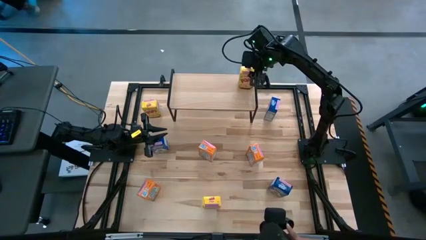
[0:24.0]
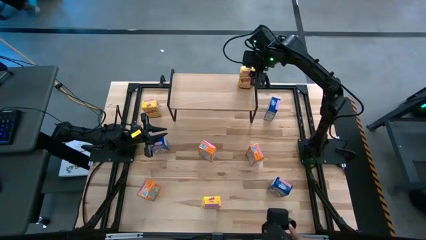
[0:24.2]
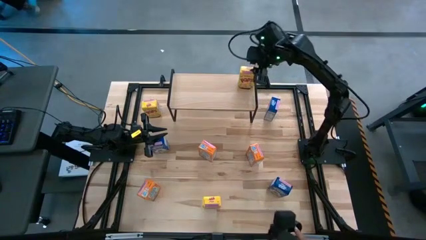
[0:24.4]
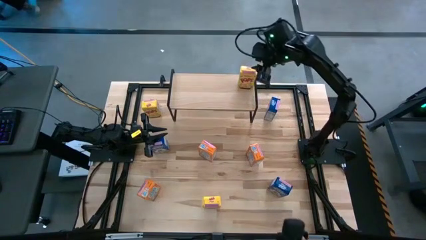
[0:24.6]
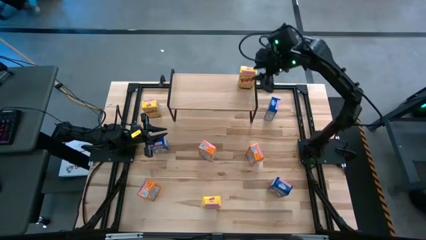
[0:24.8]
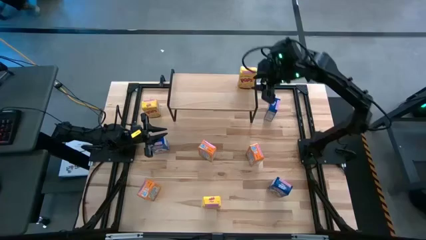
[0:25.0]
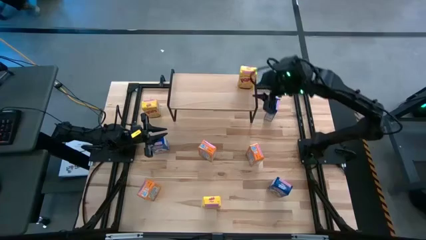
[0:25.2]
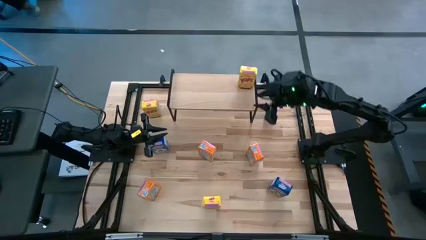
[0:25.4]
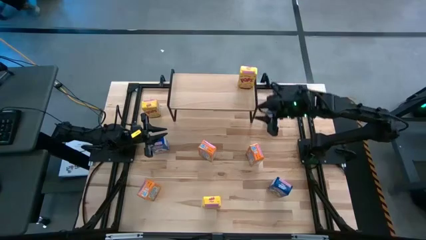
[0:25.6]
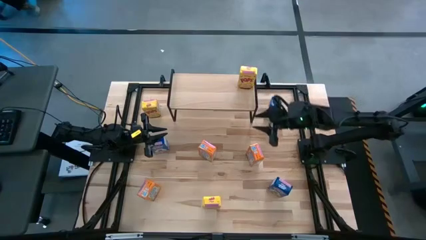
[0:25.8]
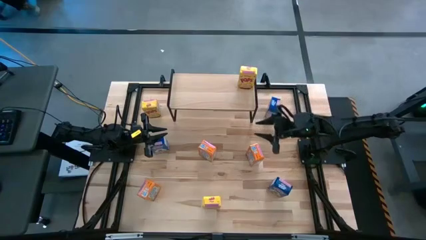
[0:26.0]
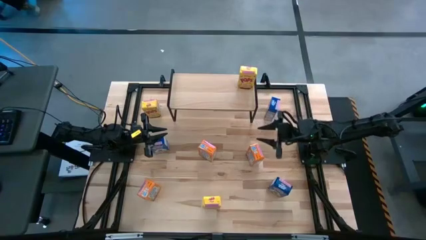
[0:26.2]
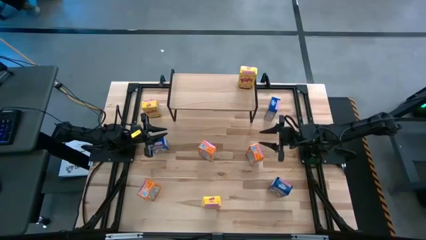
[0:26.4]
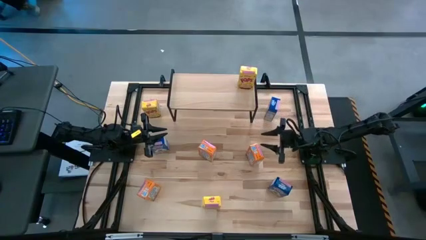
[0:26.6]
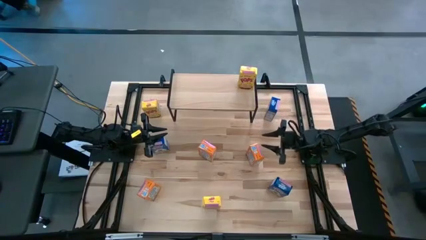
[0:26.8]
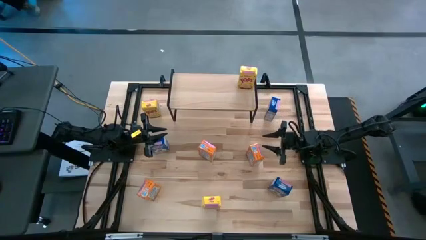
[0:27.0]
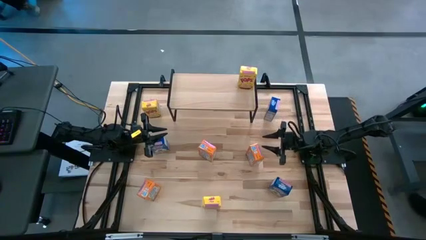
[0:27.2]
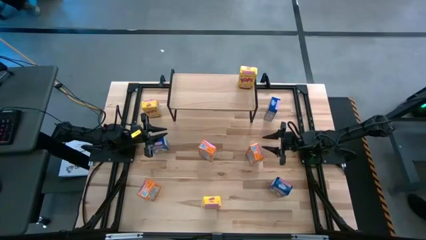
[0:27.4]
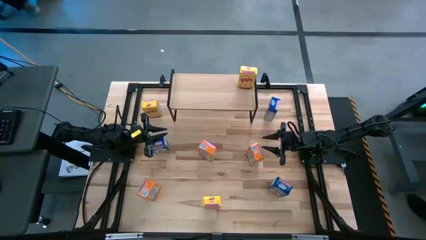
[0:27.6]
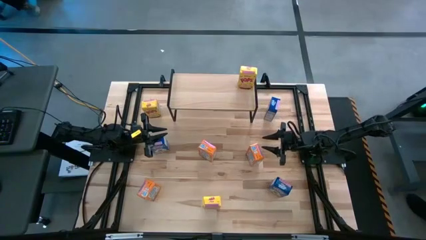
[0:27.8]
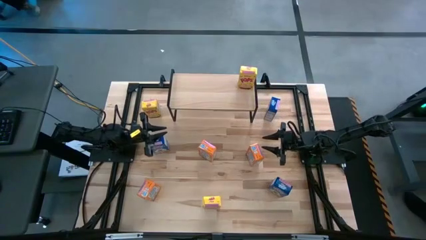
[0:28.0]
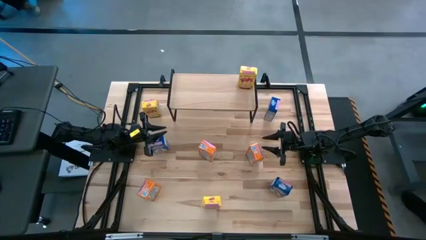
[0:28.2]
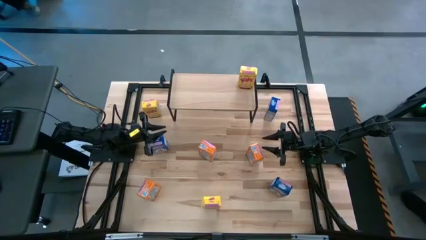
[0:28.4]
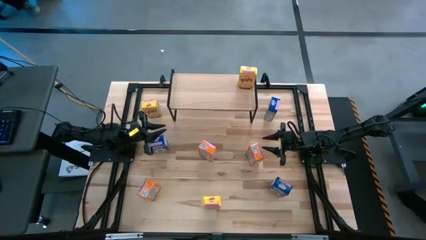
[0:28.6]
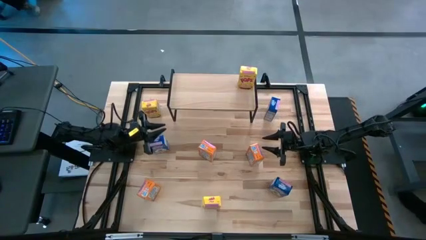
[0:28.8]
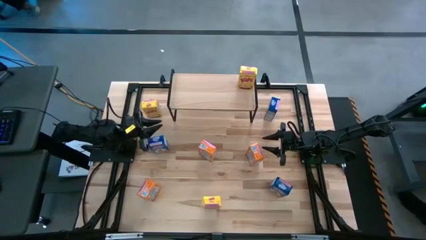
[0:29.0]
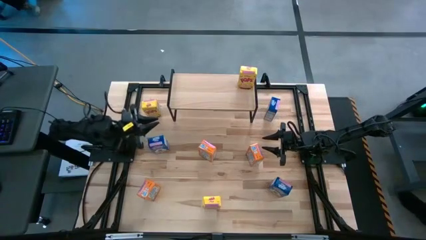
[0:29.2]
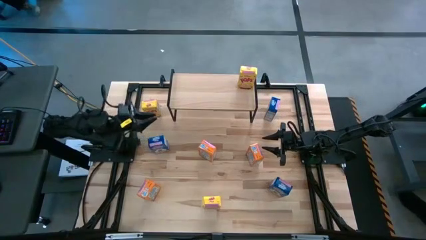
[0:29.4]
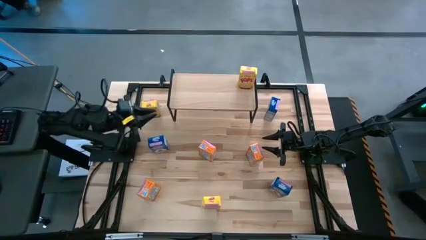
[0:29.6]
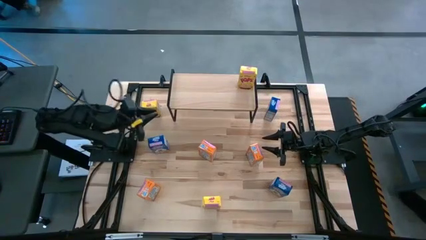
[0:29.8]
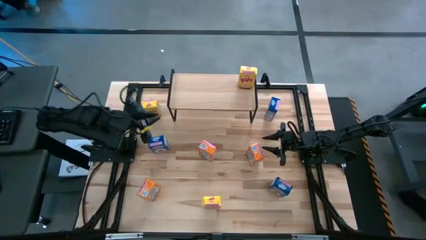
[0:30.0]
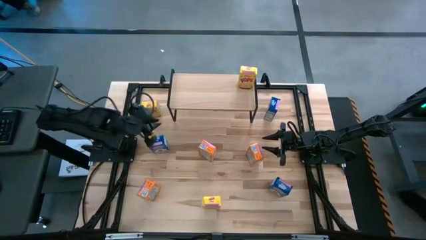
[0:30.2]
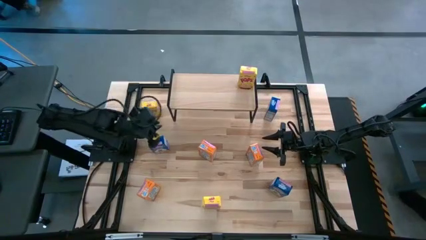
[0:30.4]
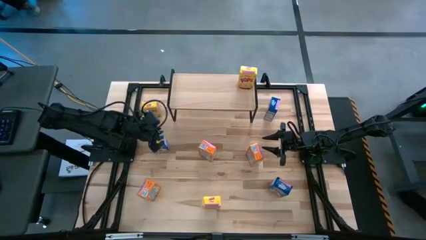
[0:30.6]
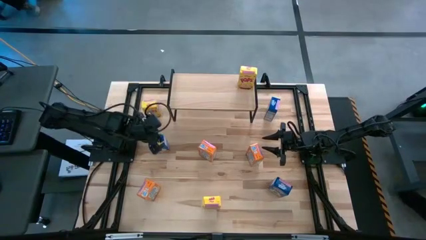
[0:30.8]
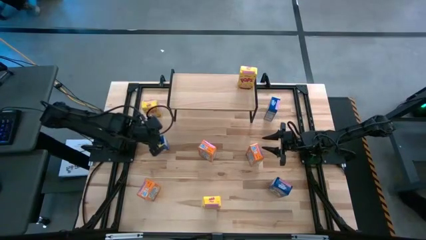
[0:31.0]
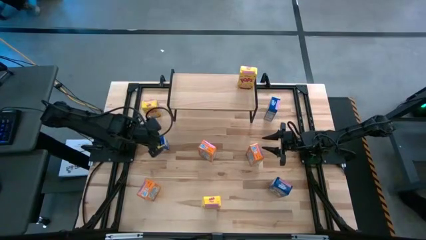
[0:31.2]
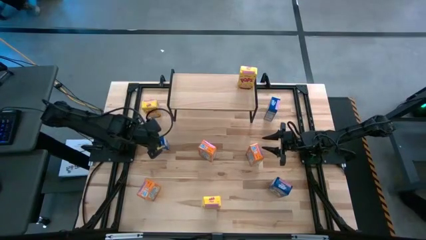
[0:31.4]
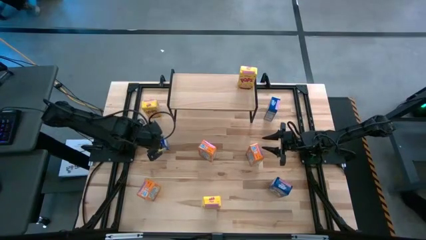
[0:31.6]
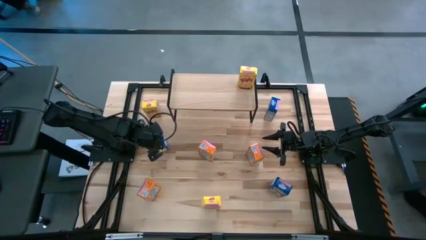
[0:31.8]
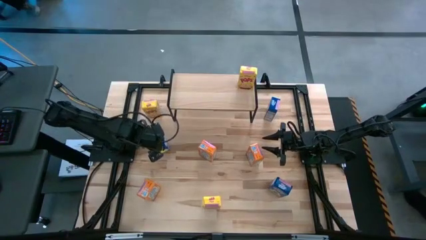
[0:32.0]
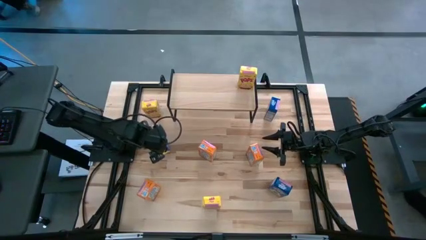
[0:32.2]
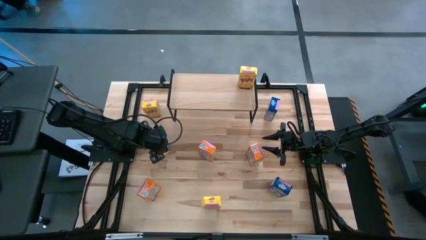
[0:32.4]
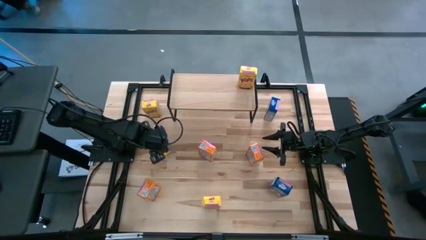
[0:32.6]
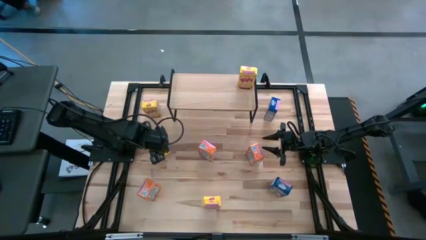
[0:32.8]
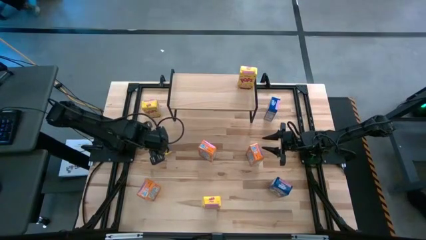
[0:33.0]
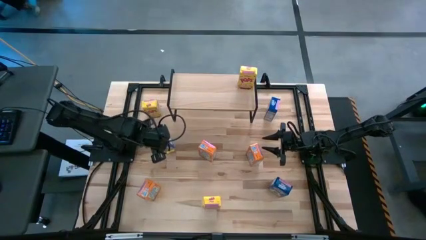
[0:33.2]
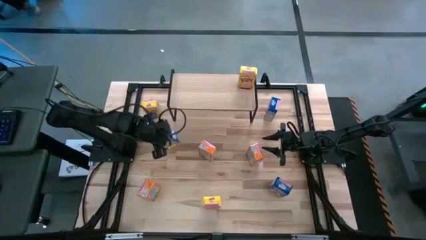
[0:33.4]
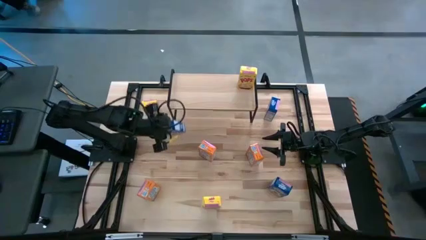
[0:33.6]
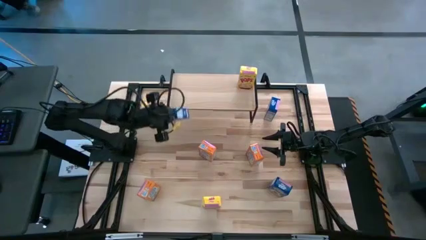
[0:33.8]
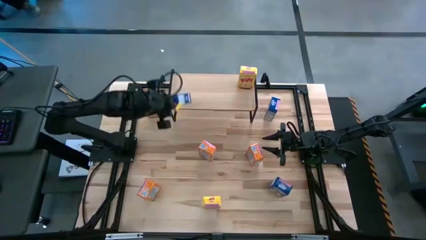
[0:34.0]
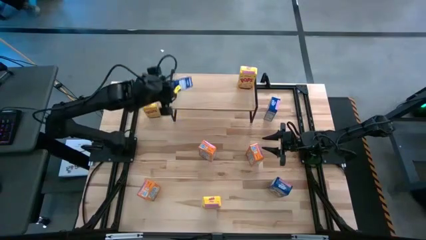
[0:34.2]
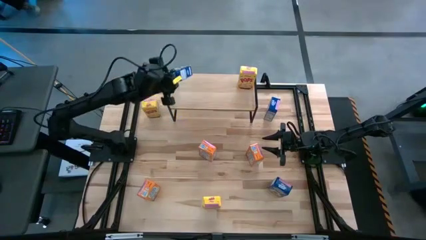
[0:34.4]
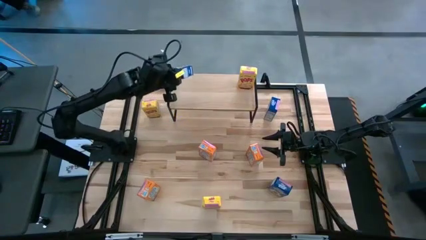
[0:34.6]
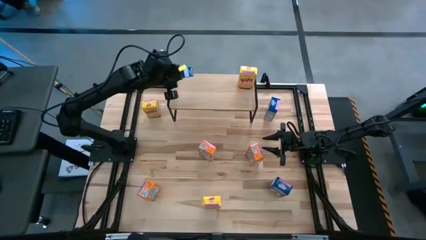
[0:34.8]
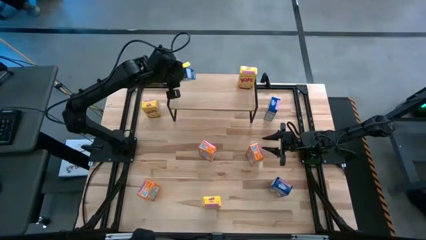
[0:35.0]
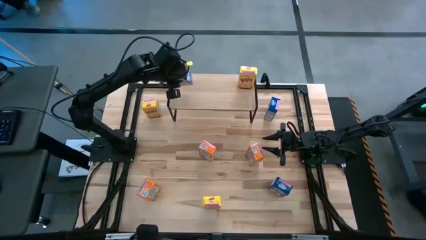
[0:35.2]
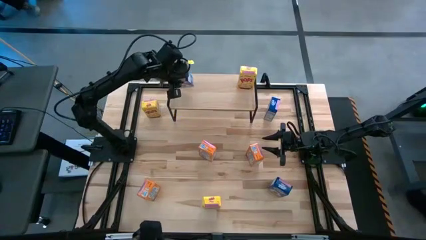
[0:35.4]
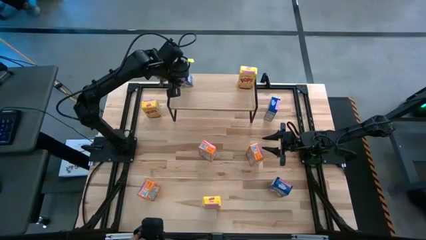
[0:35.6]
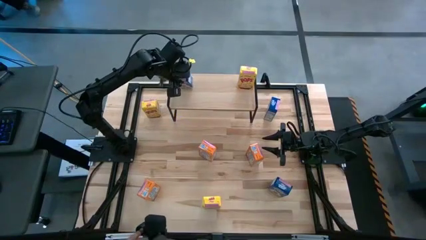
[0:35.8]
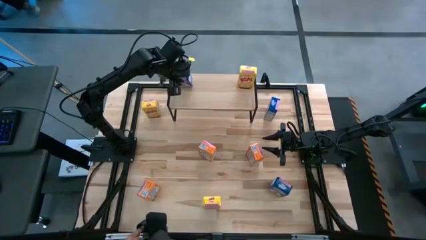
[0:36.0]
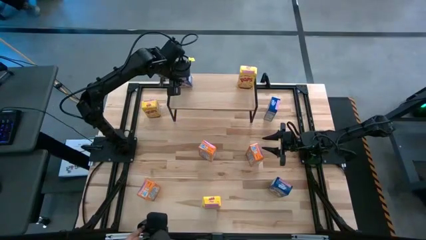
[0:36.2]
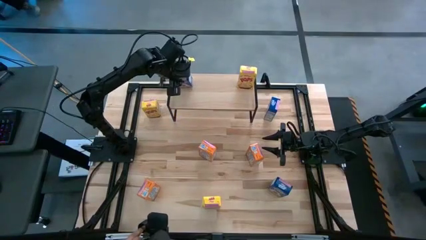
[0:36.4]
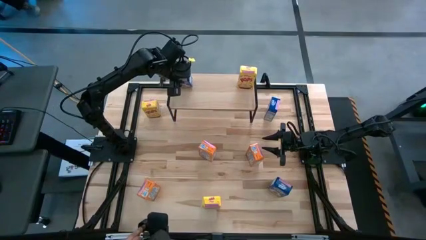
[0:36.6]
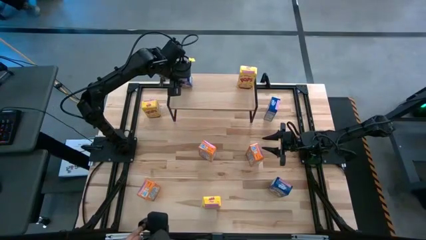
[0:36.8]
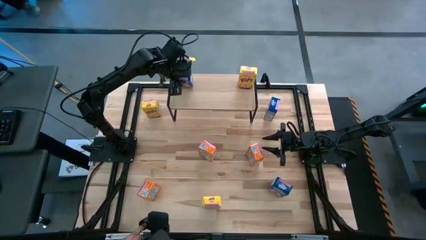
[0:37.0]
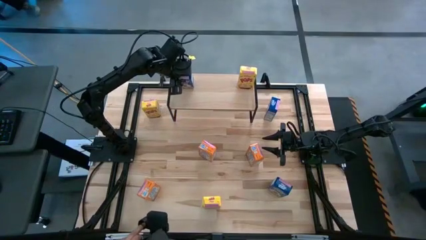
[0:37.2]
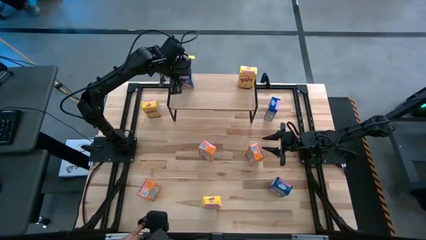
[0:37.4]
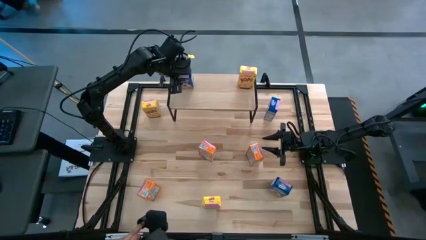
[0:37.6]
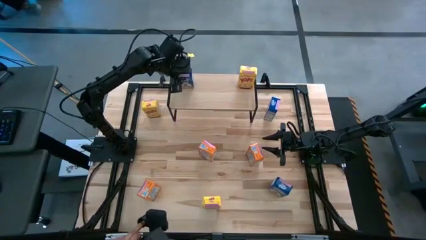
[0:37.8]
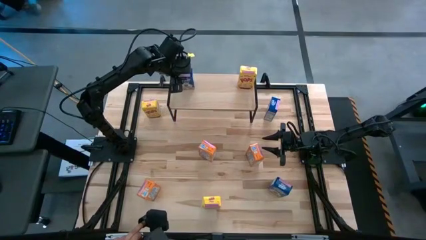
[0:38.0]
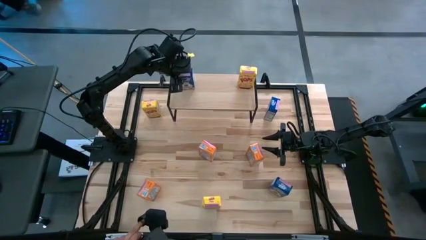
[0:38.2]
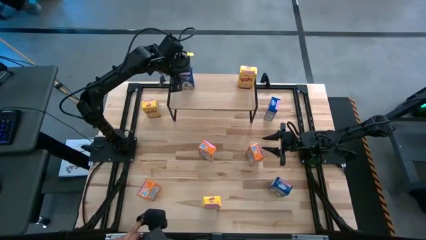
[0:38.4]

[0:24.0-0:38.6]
Task: Stack cereal on shelf
Put the middle left blue cereal box on the shelf
